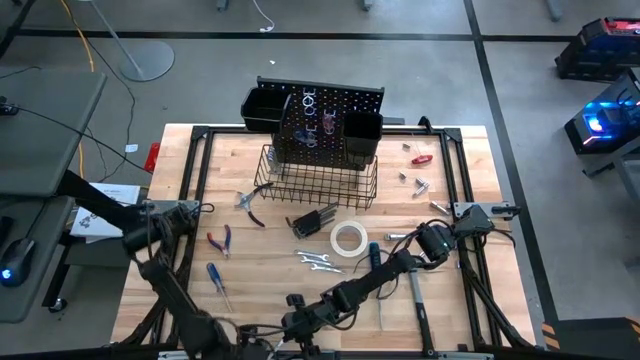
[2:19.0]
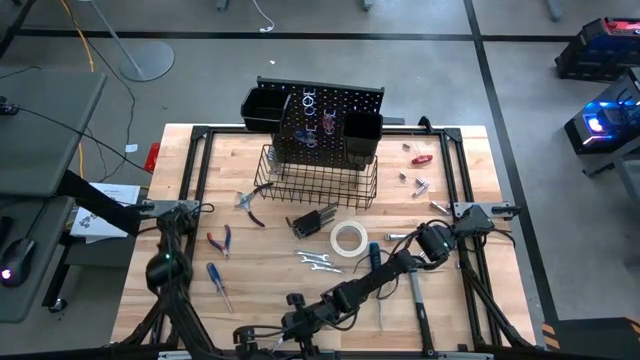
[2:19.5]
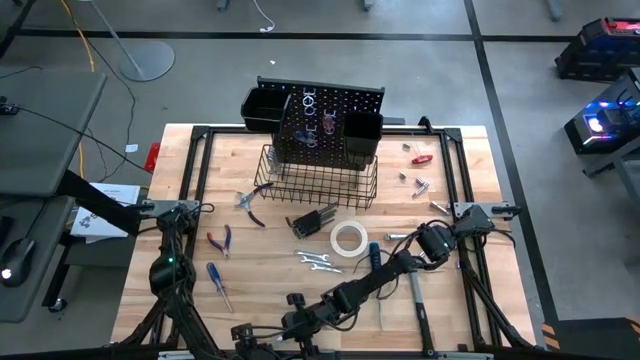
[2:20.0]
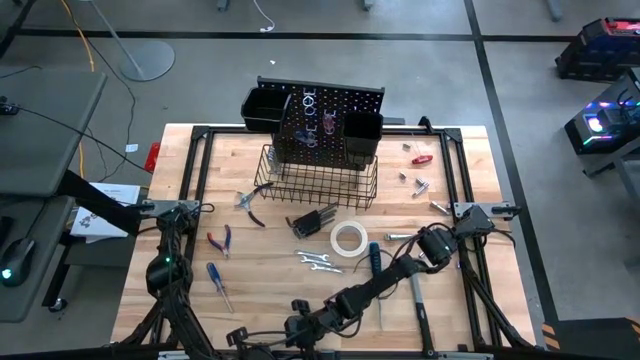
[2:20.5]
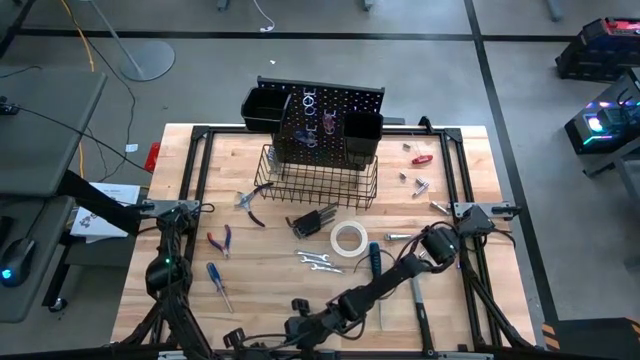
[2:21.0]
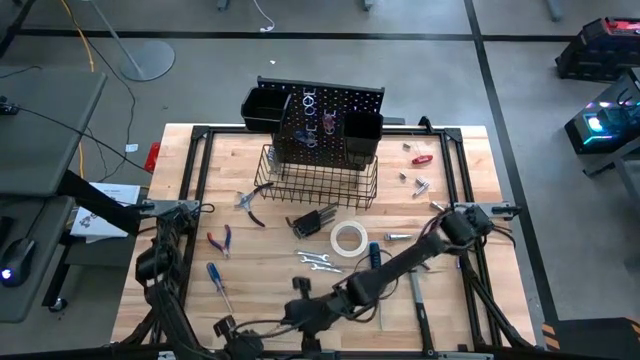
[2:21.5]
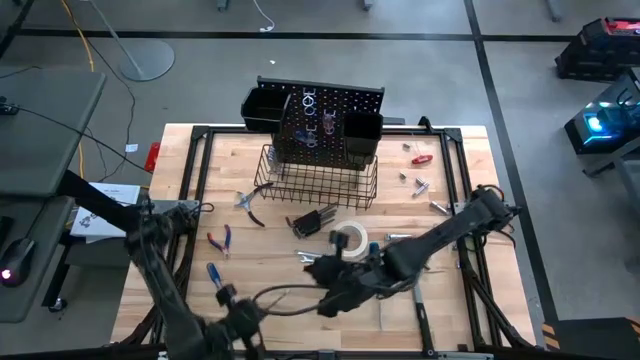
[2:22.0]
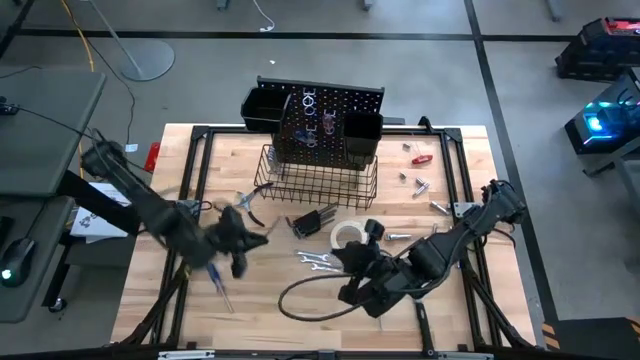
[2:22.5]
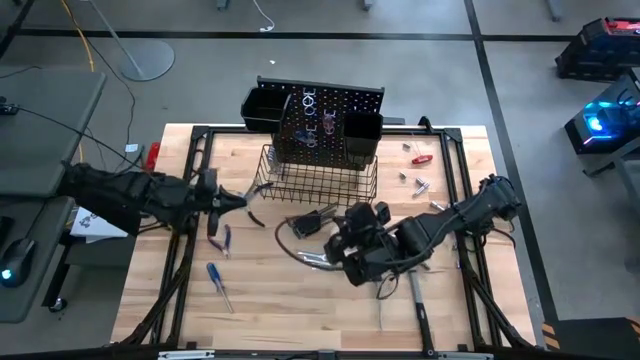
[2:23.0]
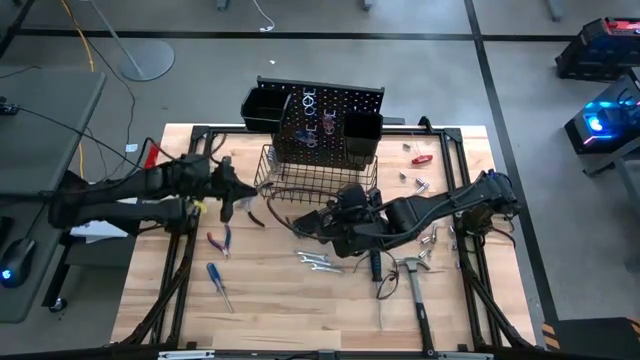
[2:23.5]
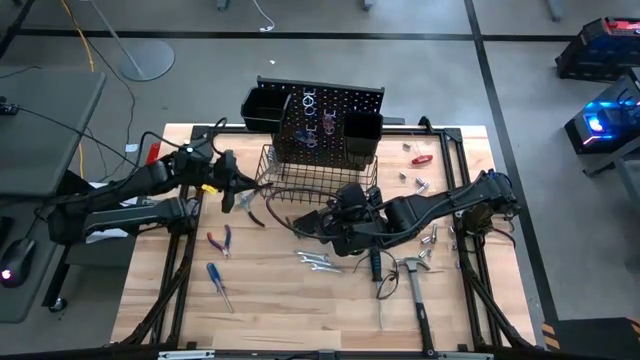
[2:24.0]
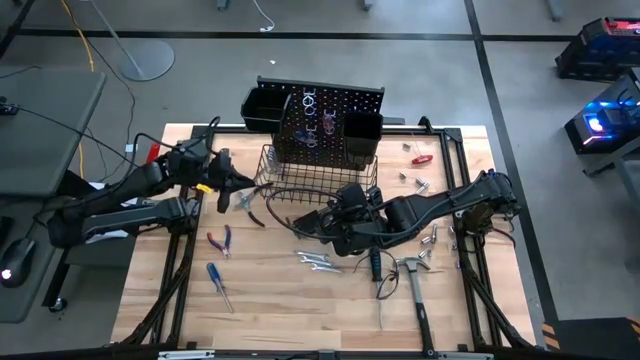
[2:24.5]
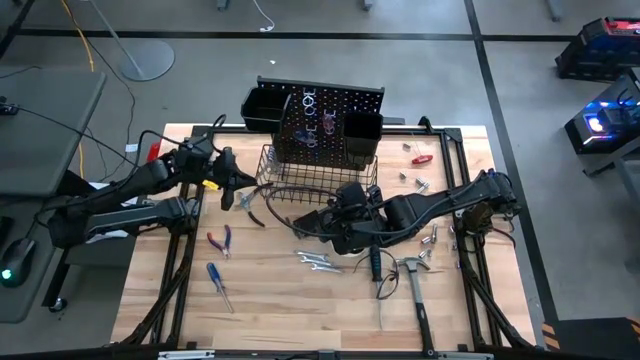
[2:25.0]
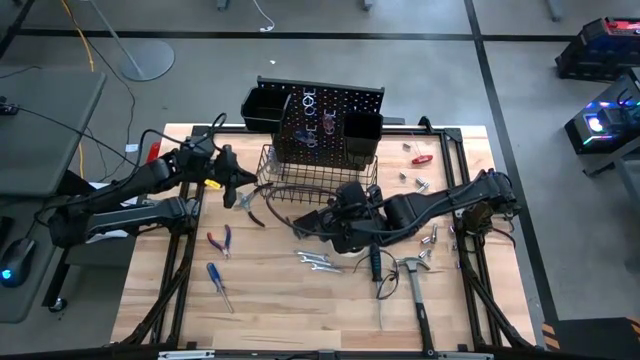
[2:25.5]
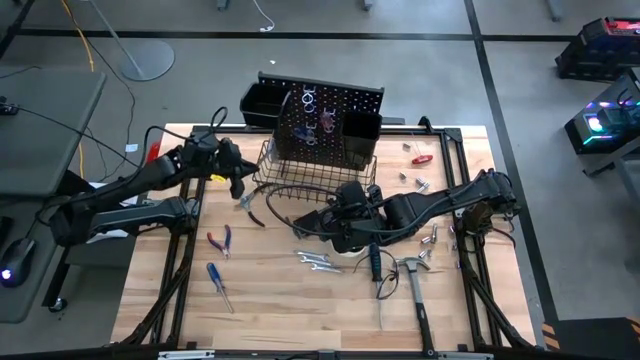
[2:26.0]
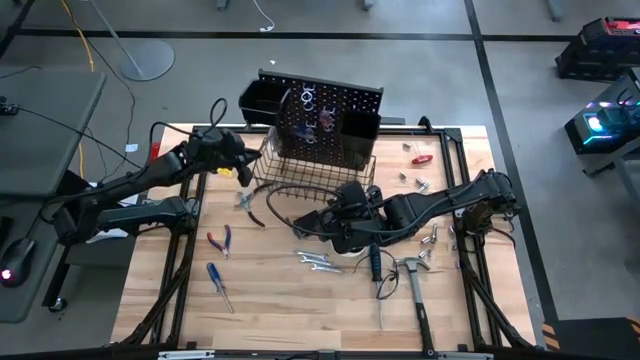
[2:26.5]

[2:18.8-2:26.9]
Task: Hang tools onto peg board
Hang the wrench on the peg board

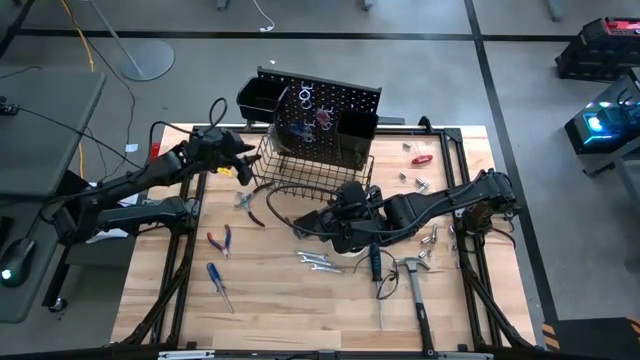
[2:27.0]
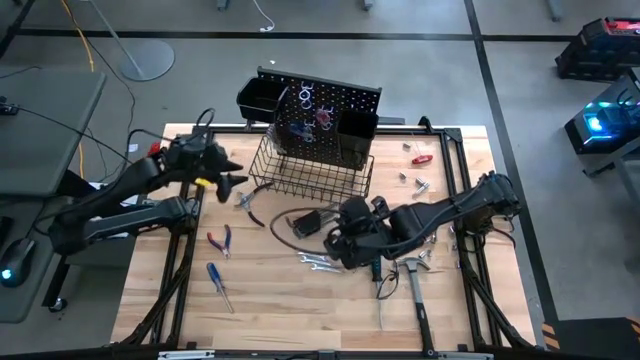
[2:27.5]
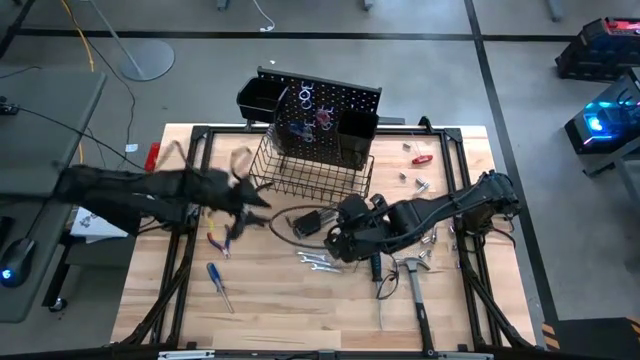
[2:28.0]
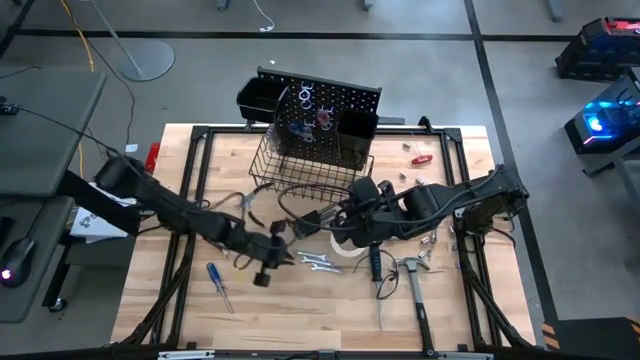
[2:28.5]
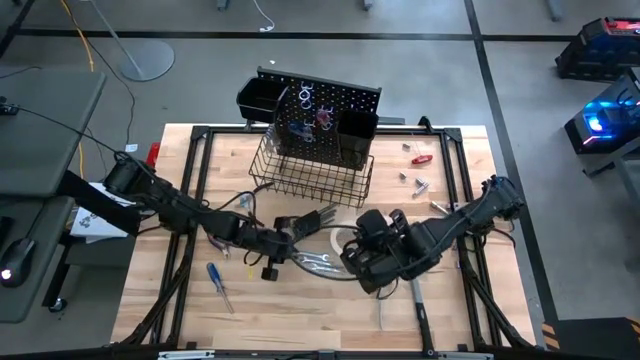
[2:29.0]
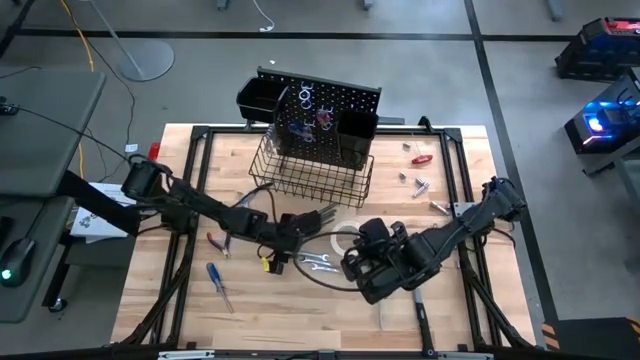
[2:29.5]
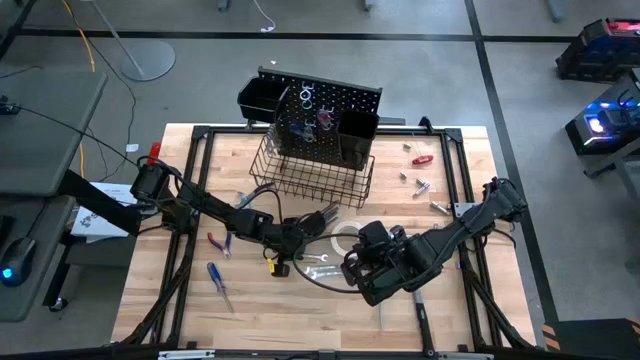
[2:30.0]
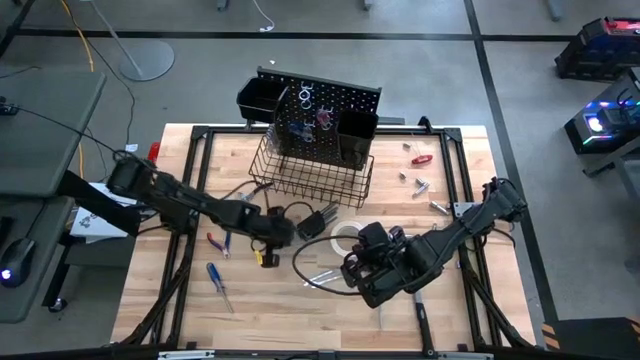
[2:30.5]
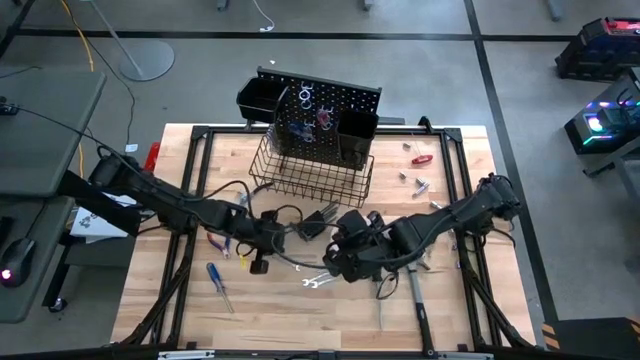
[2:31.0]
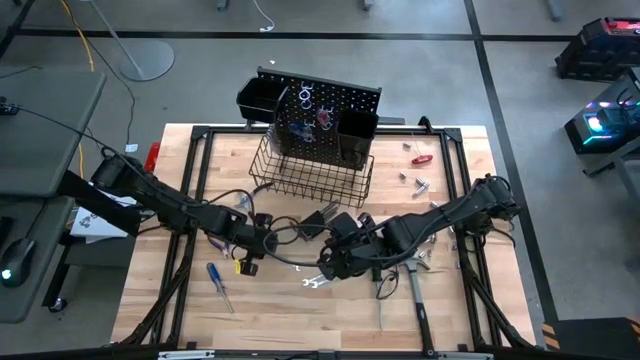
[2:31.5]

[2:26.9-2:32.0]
Hang the wrench on the peg board

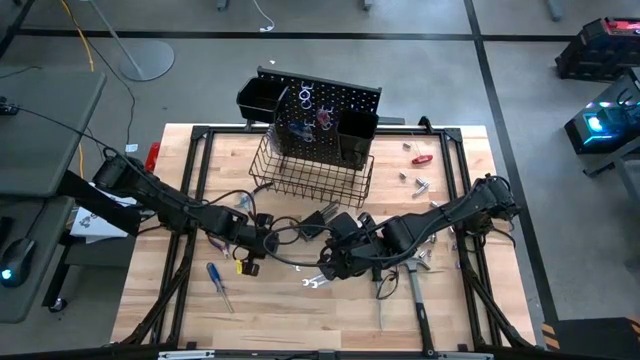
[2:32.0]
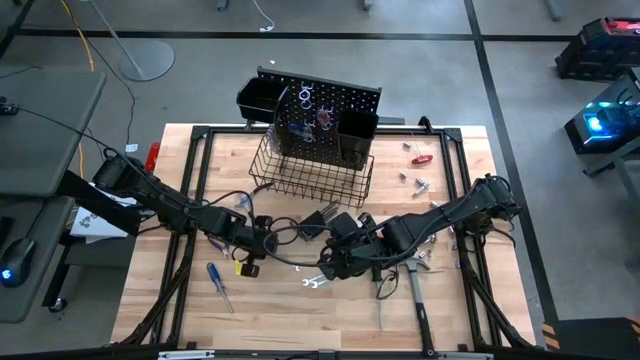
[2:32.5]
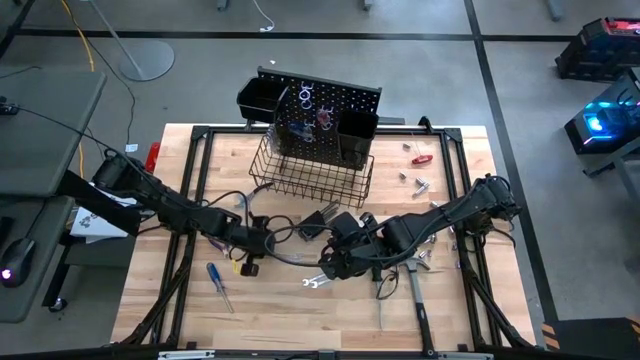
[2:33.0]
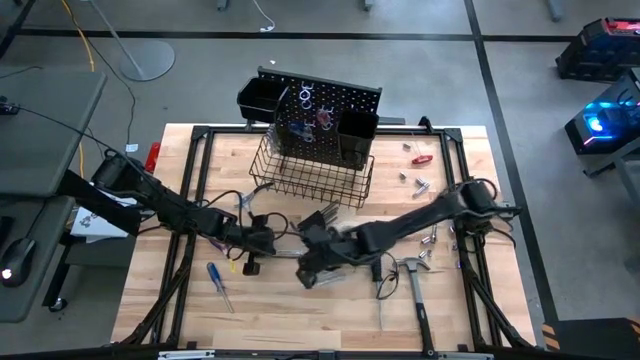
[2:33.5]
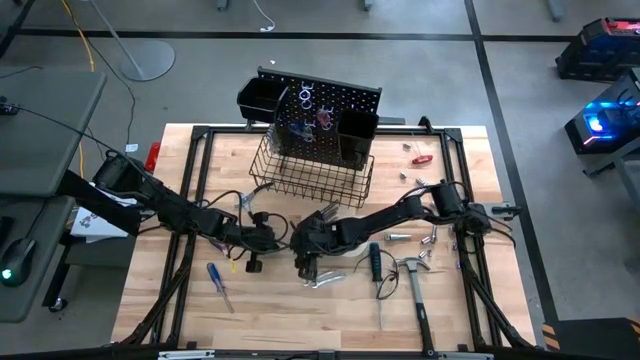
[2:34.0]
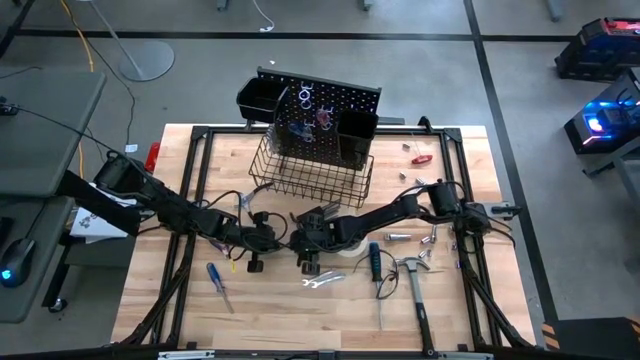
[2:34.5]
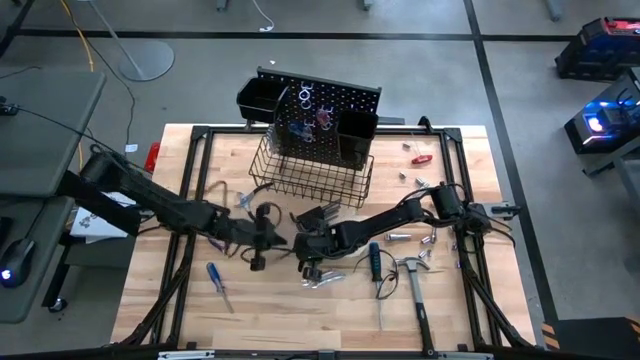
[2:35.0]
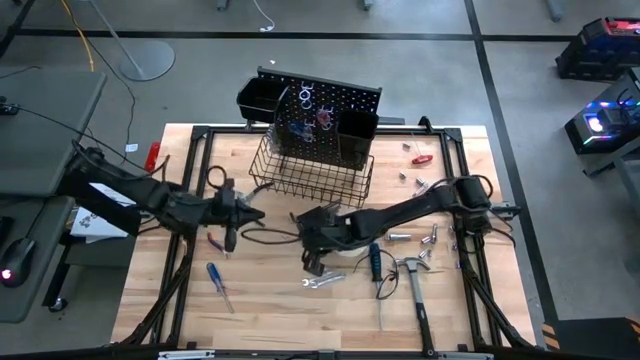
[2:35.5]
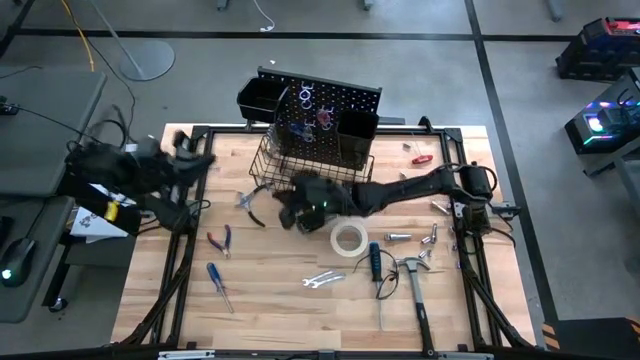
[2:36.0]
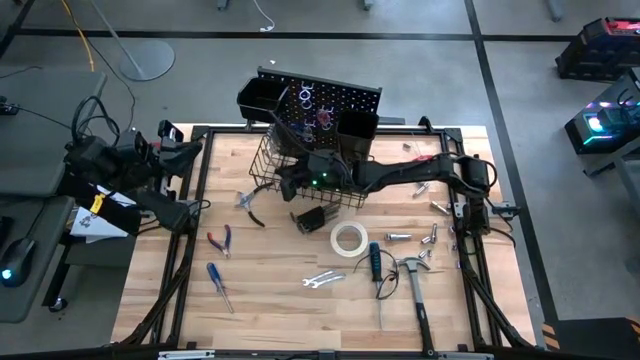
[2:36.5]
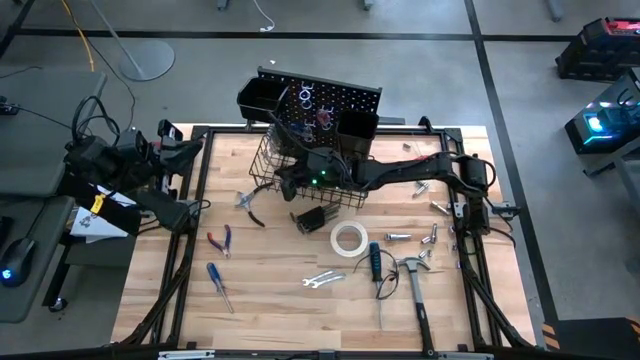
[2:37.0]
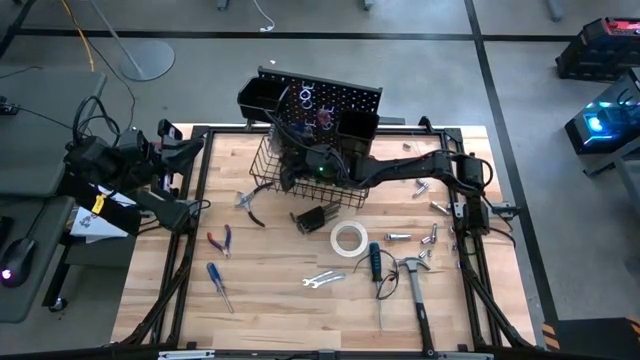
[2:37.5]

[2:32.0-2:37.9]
Hang the wrench on the peg board

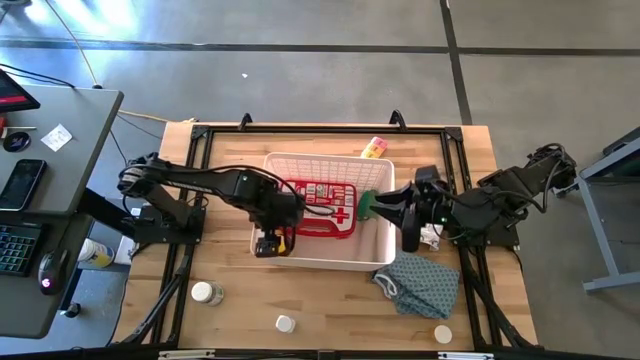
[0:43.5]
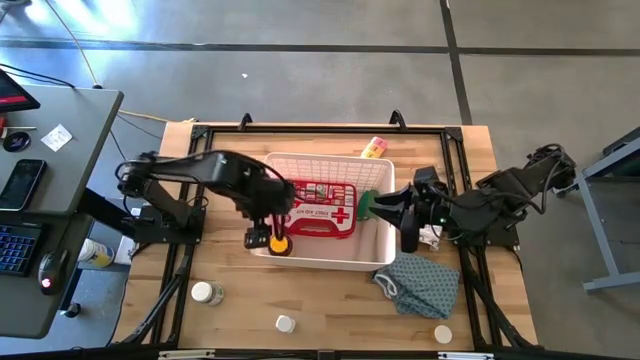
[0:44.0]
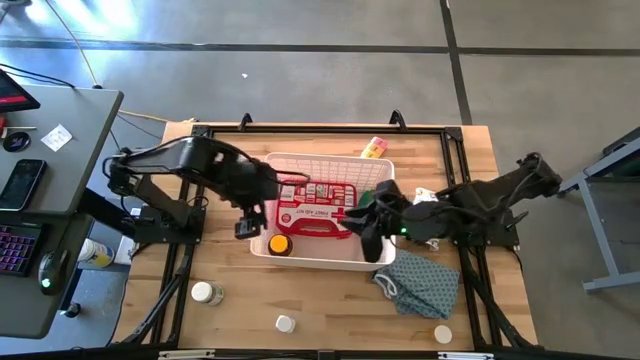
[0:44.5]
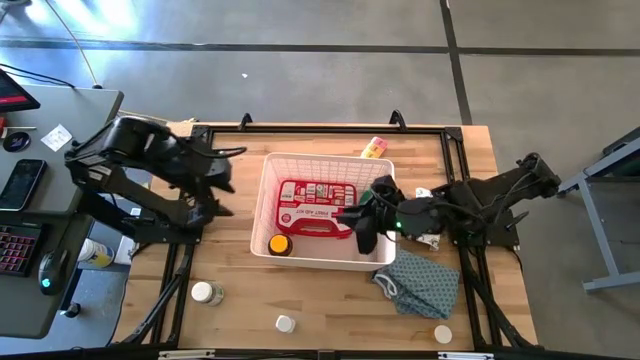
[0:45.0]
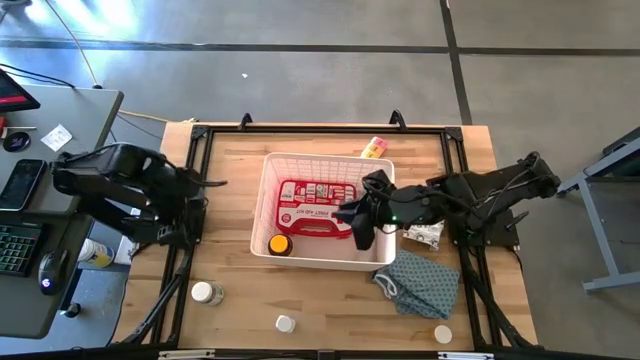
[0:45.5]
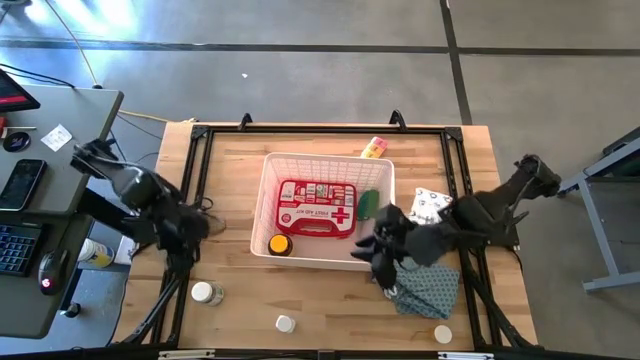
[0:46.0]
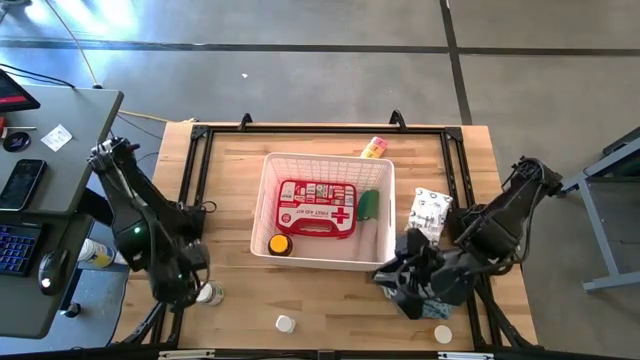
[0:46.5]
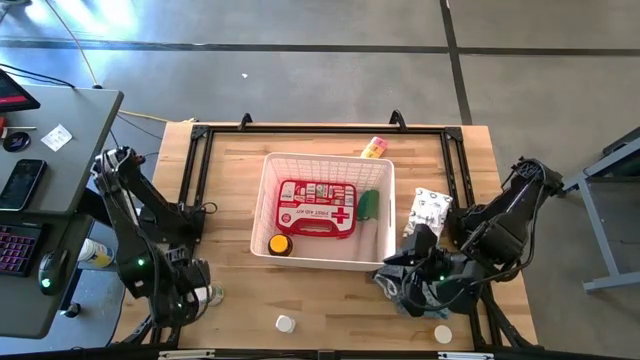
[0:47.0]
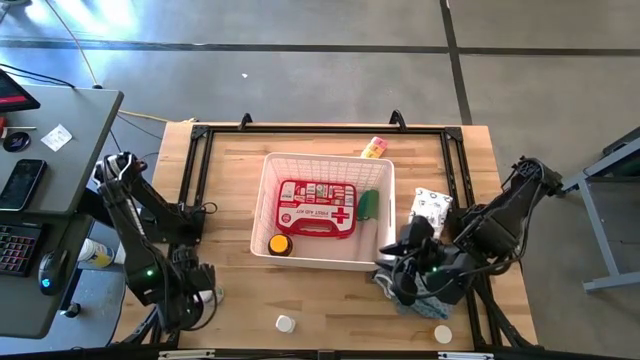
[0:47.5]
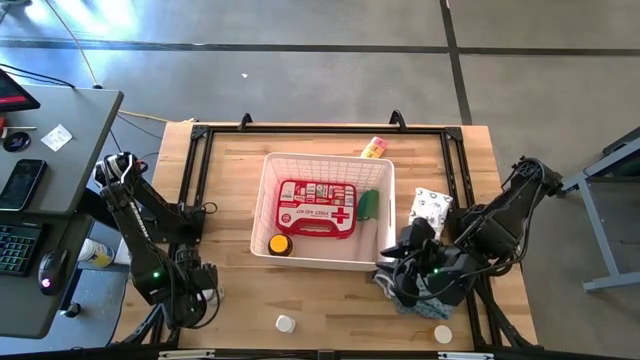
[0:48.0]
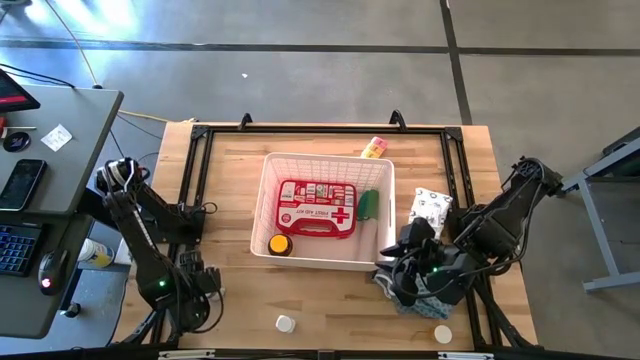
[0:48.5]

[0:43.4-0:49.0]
Task: Pick & place medical supplies in basket/bin
Put the left white pill bottle into the white container
